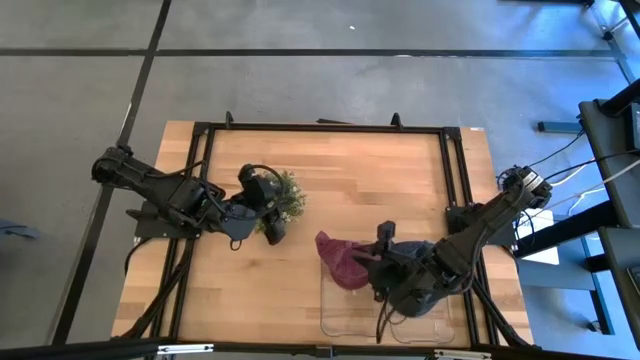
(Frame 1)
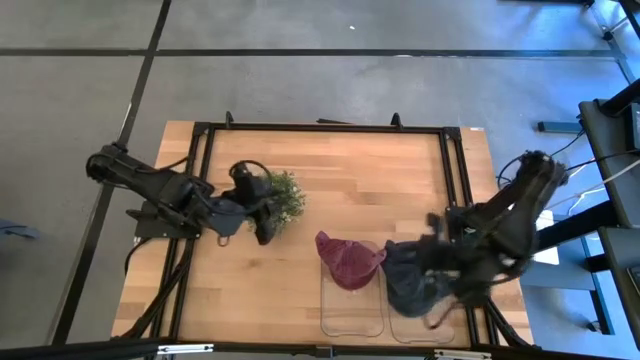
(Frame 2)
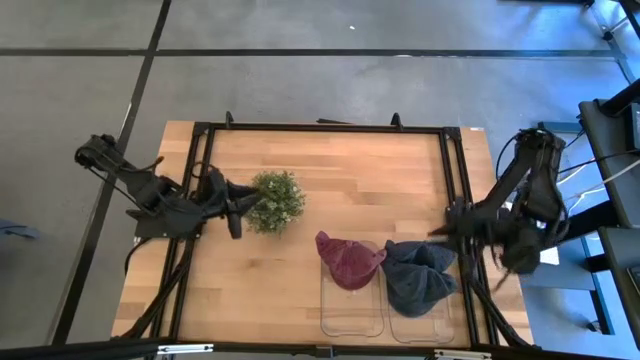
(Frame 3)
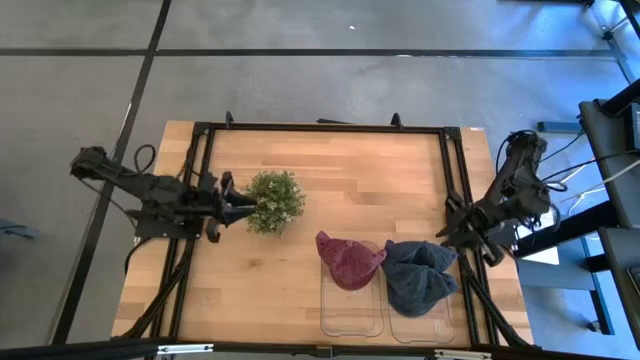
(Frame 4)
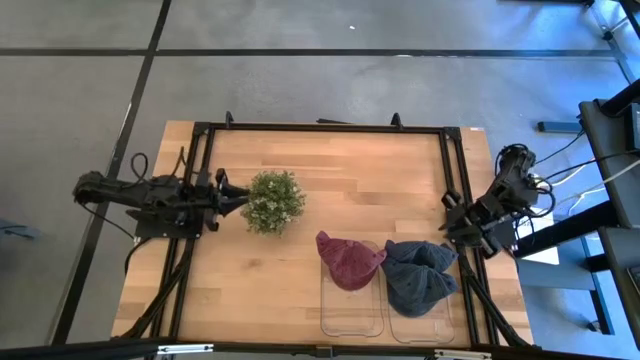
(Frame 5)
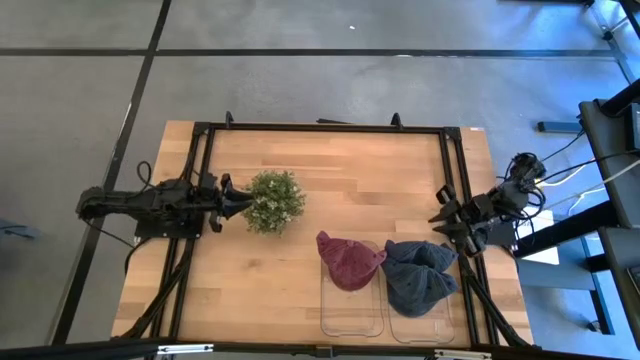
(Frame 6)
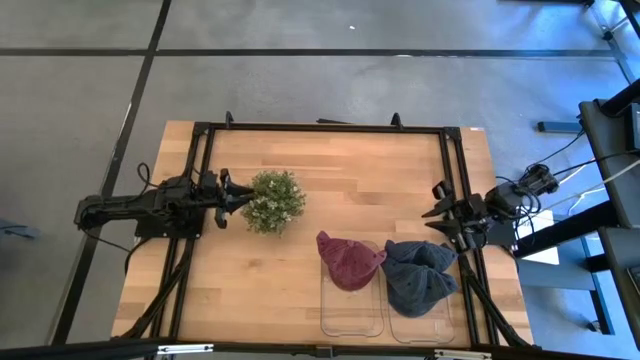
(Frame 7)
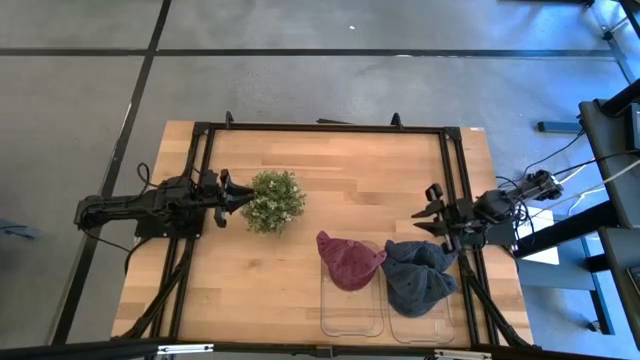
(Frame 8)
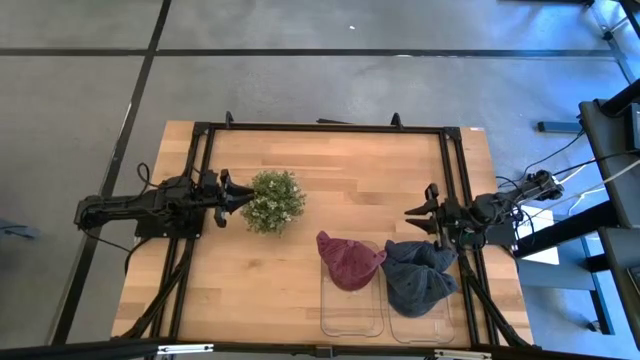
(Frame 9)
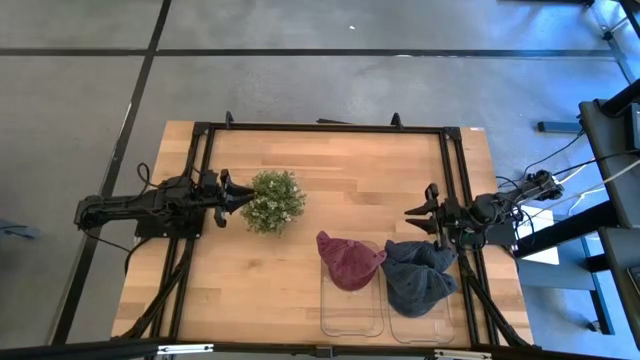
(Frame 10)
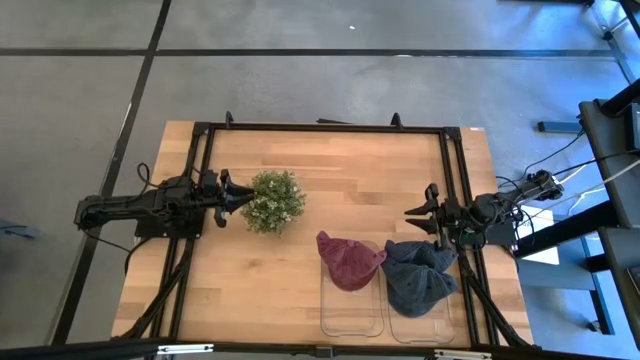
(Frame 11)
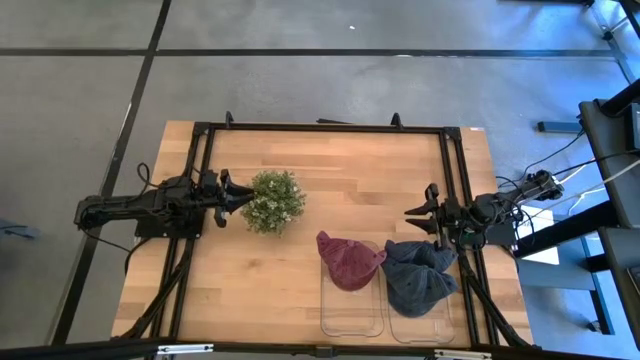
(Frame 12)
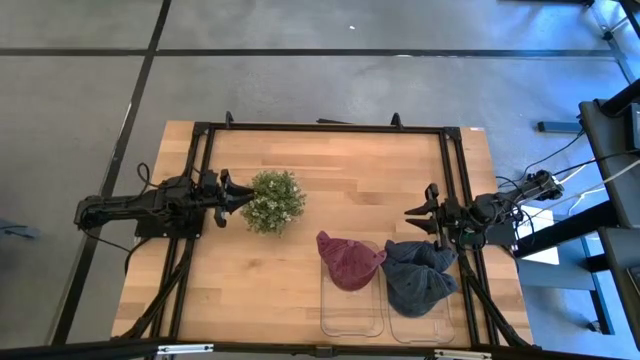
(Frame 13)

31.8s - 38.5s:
Task: Pick & Place hat
Return to Home Position

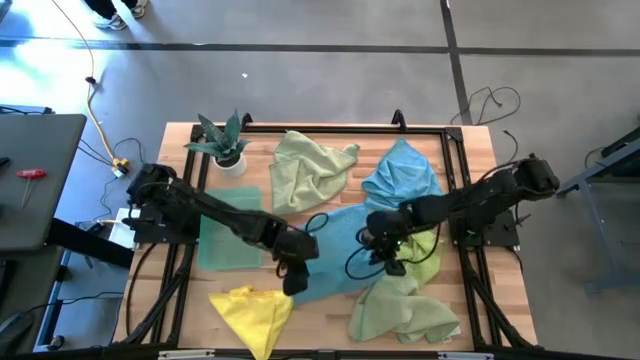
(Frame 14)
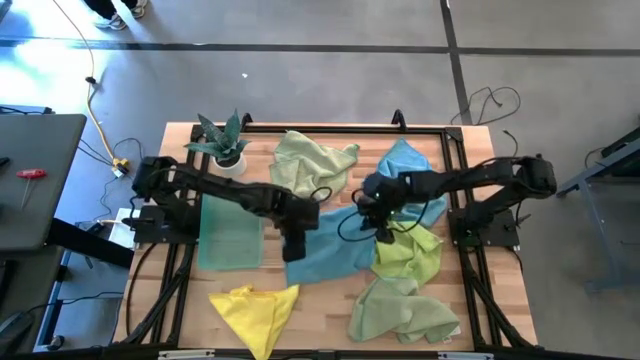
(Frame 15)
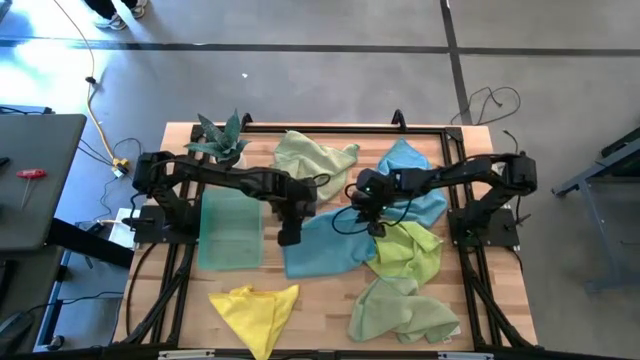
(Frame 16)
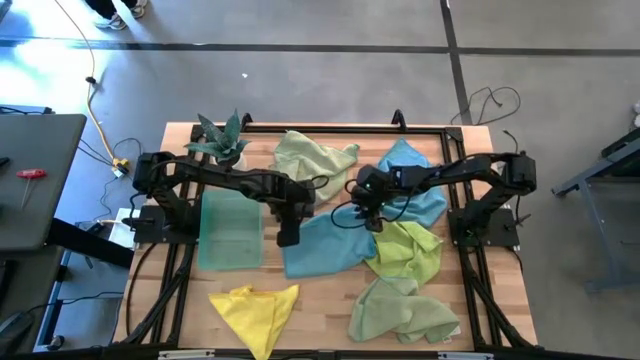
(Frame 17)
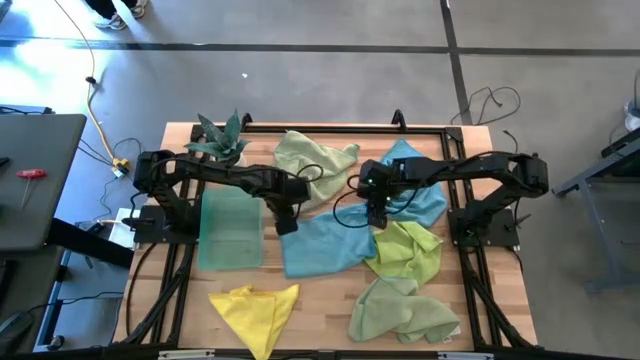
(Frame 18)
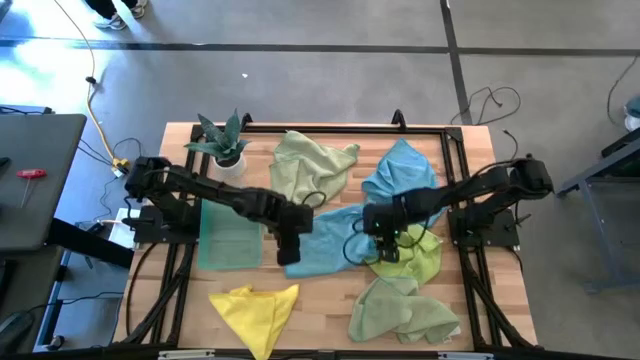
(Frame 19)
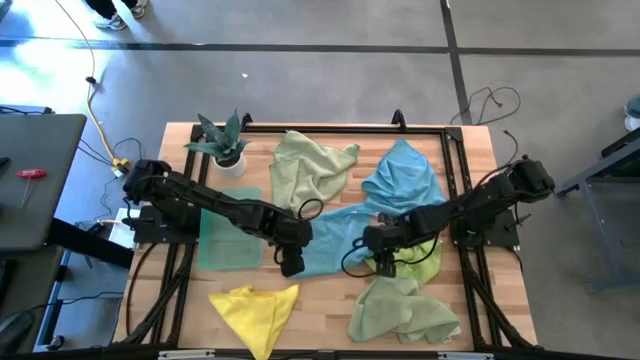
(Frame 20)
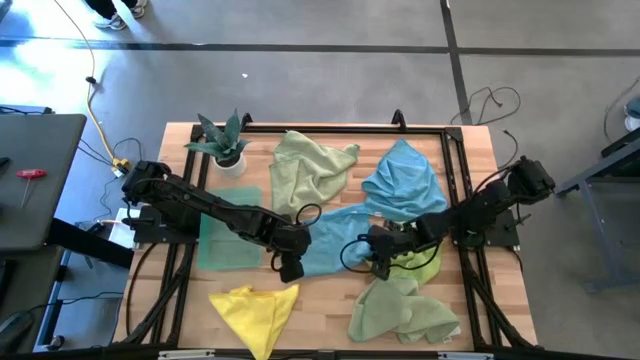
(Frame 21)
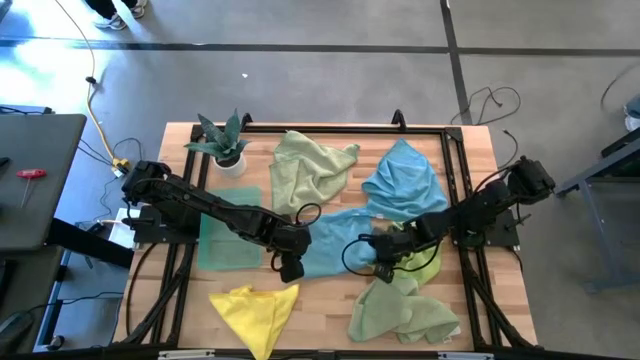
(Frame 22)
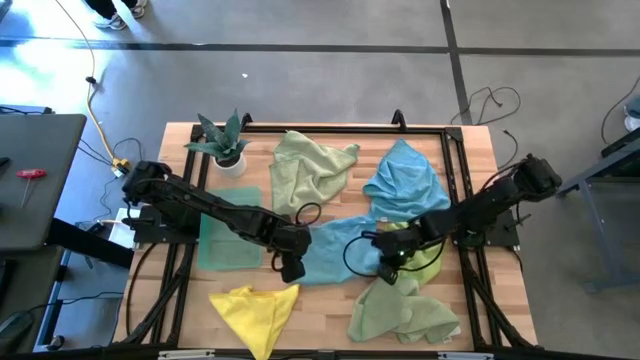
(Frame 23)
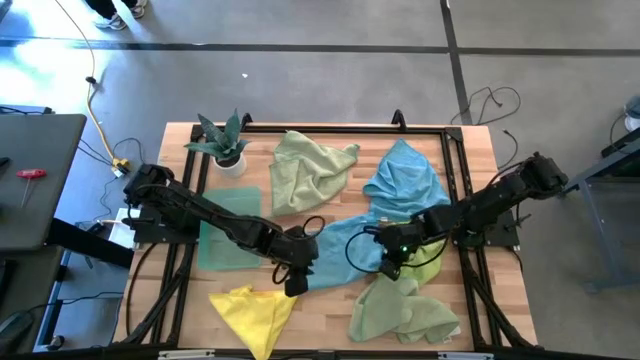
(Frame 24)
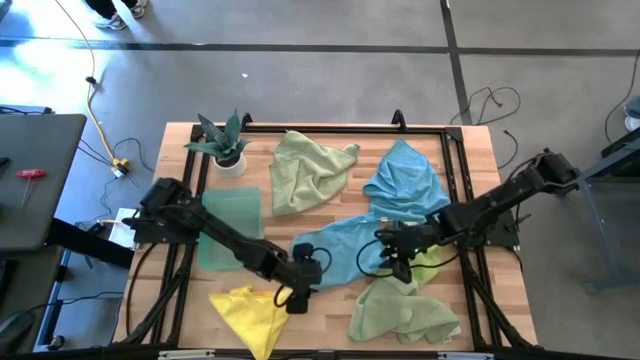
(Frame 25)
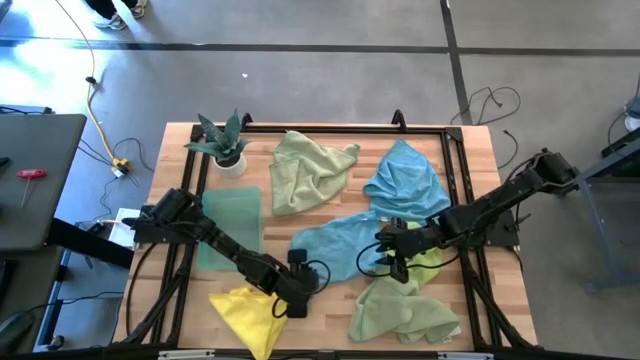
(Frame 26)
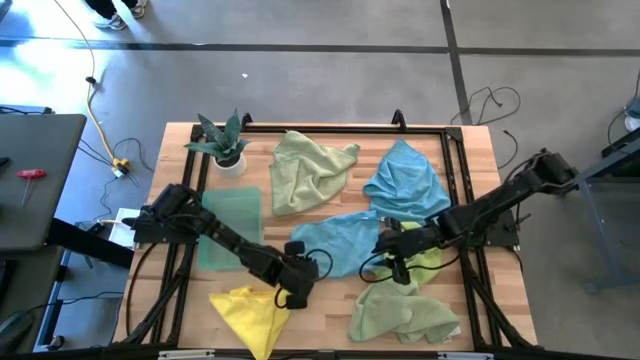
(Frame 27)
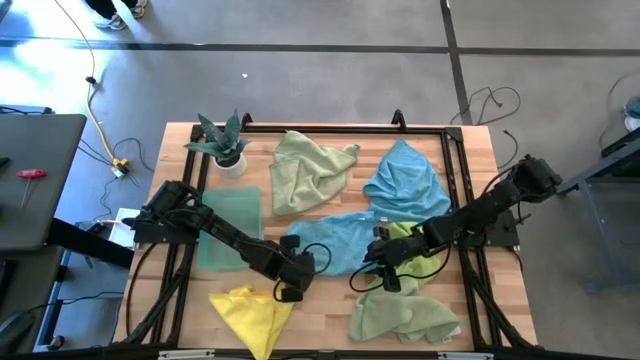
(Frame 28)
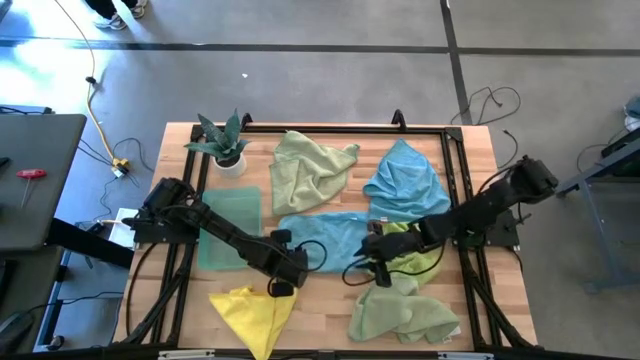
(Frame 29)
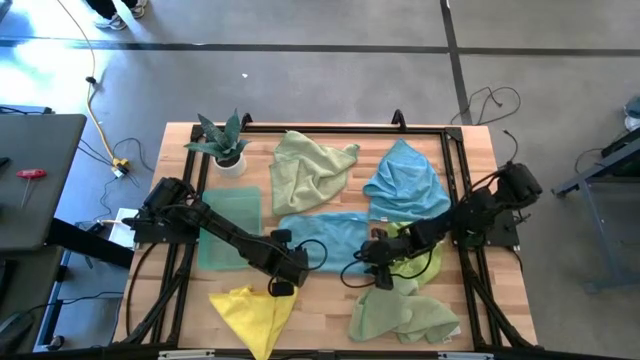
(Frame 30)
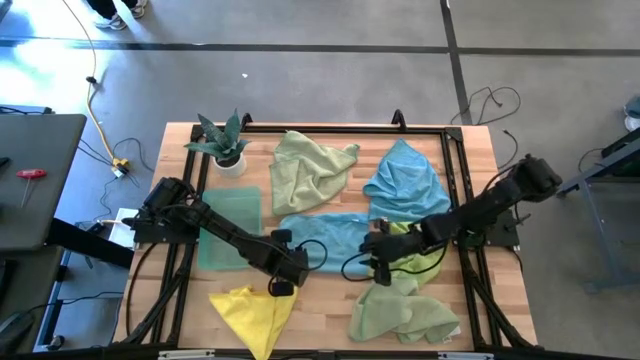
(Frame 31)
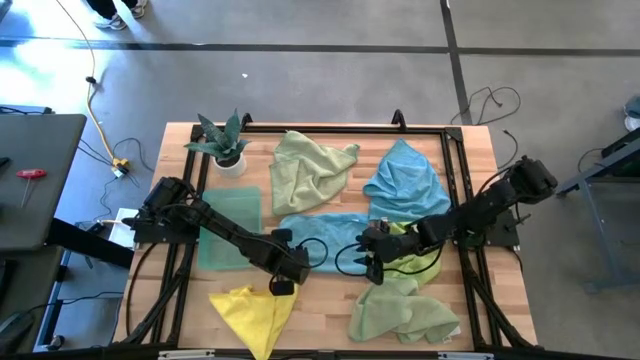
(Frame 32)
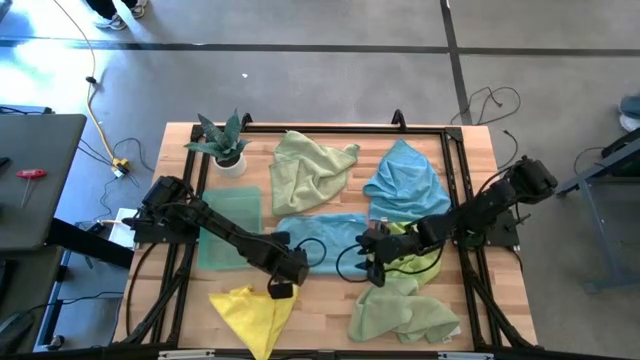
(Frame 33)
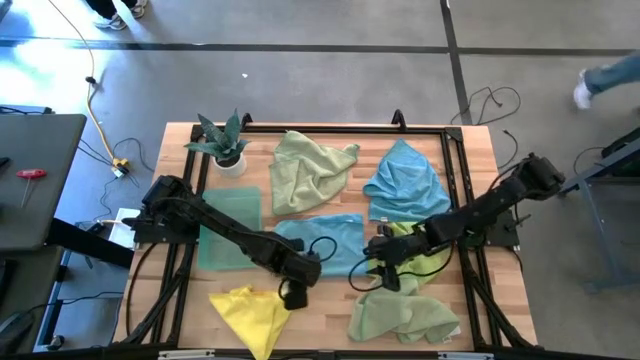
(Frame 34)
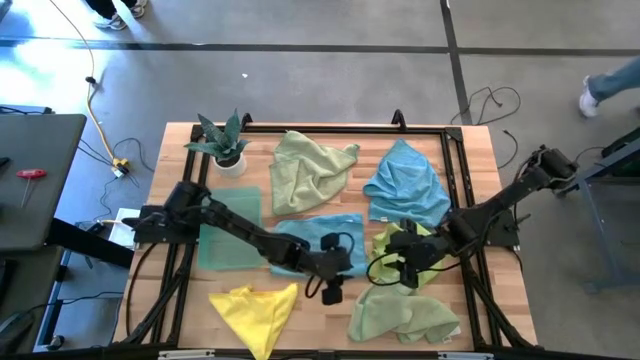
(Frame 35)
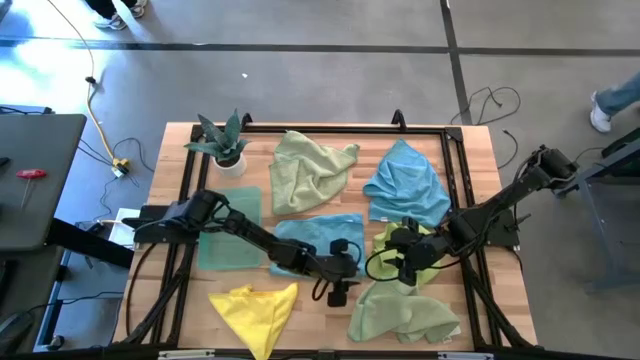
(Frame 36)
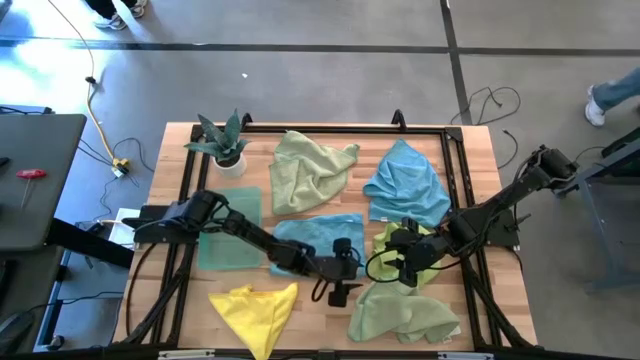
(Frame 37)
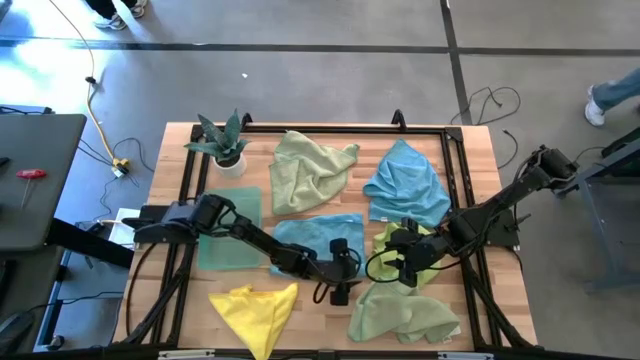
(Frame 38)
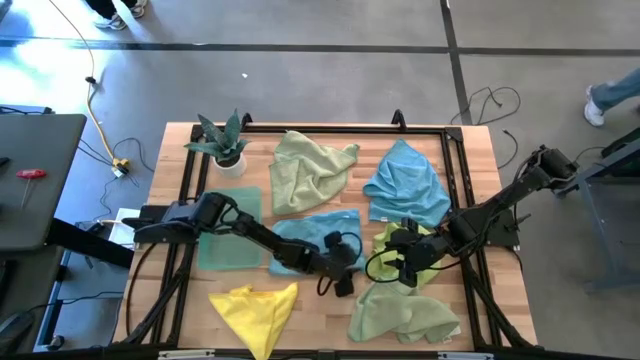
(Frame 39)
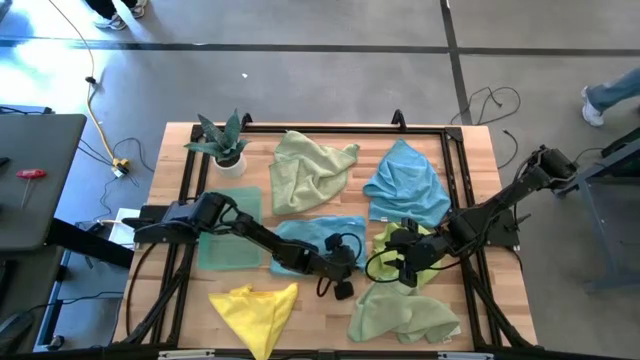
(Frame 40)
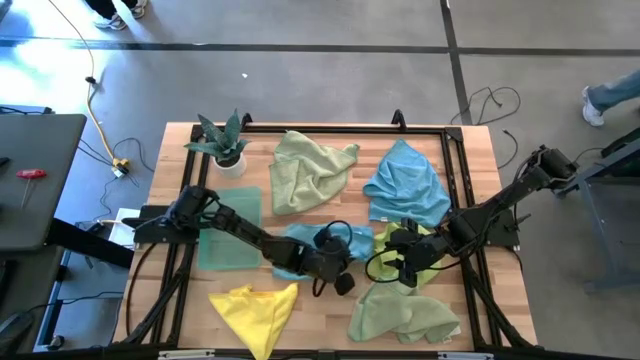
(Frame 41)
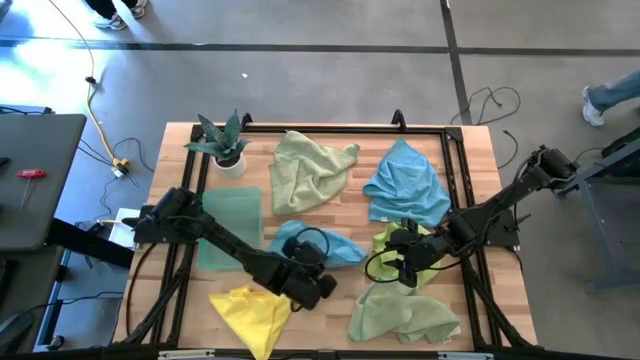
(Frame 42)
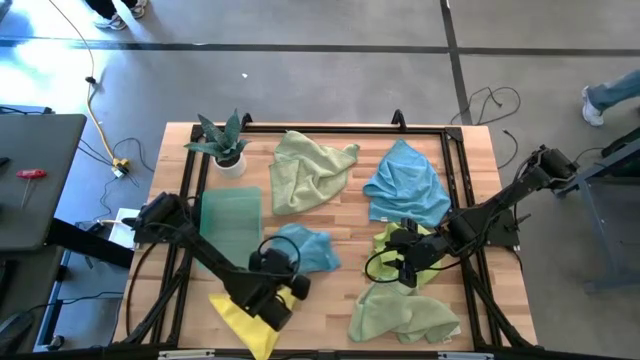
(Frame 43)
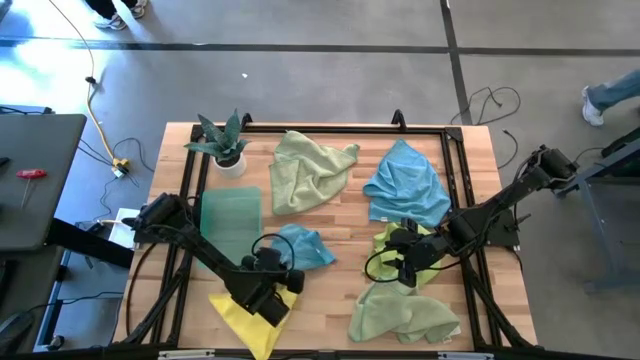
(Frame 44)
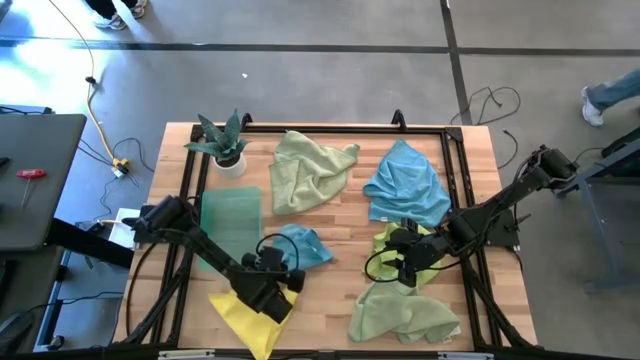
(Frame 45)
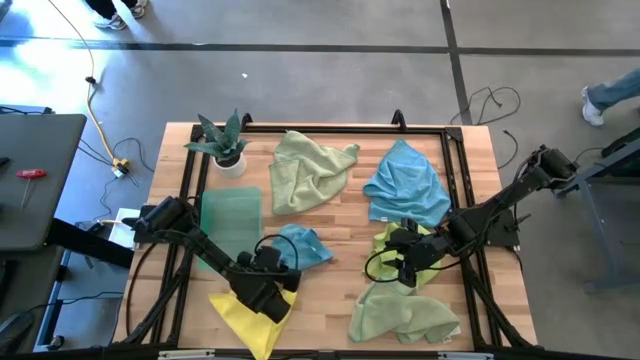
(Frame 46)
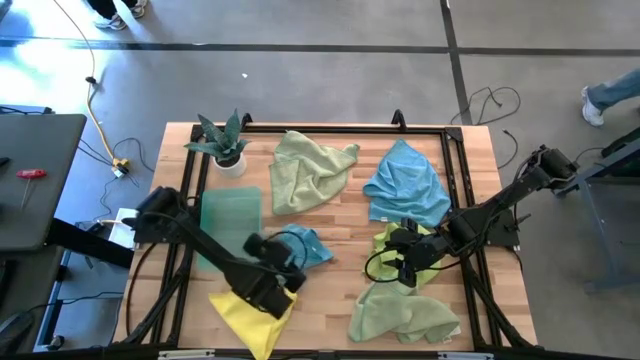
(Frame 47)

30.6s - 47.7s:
Task: Fold microfiber towels
Fold the bottom blue microfiber towel
